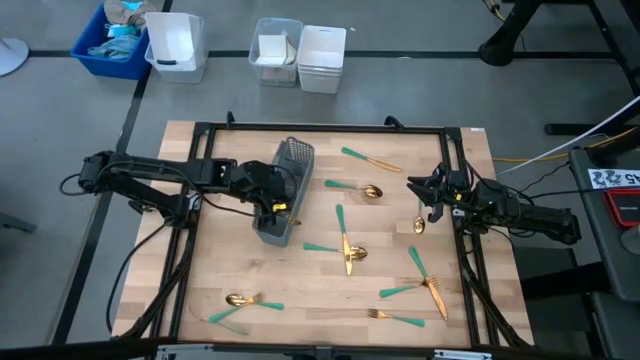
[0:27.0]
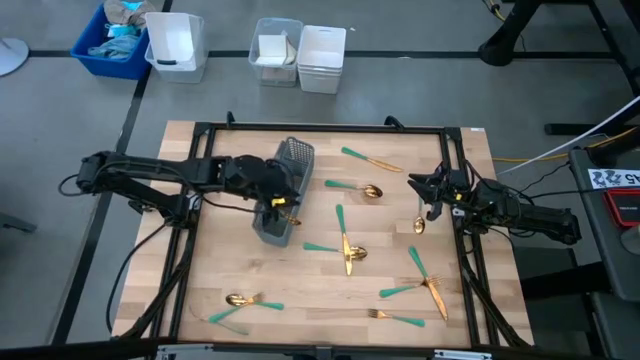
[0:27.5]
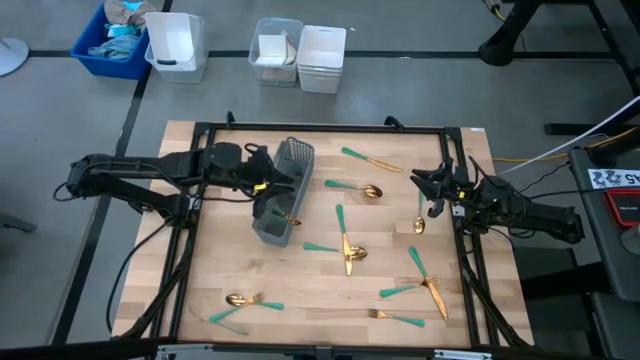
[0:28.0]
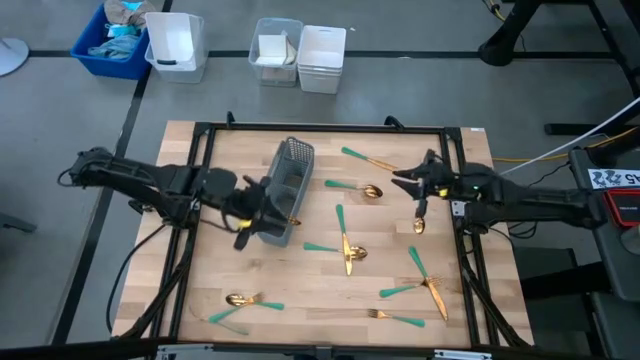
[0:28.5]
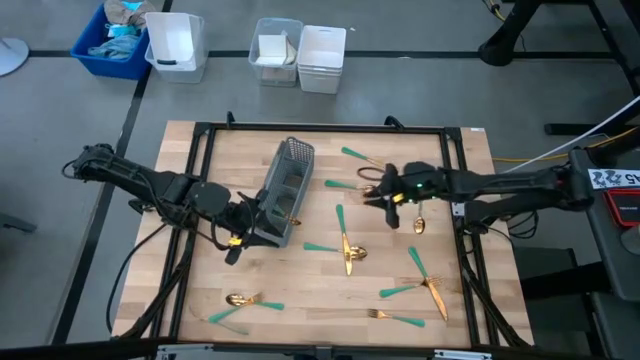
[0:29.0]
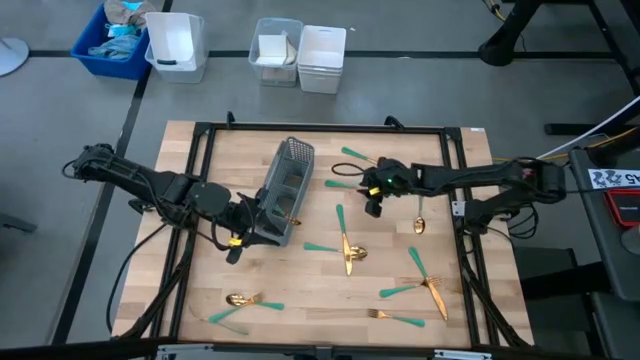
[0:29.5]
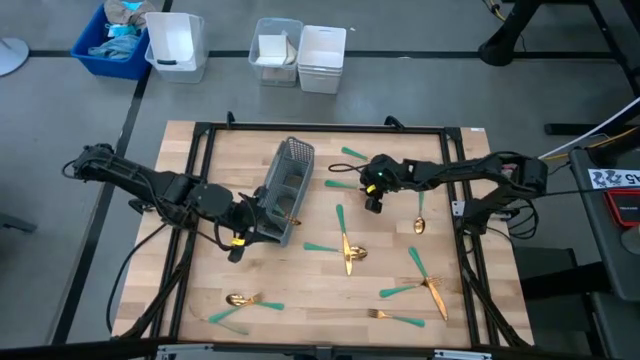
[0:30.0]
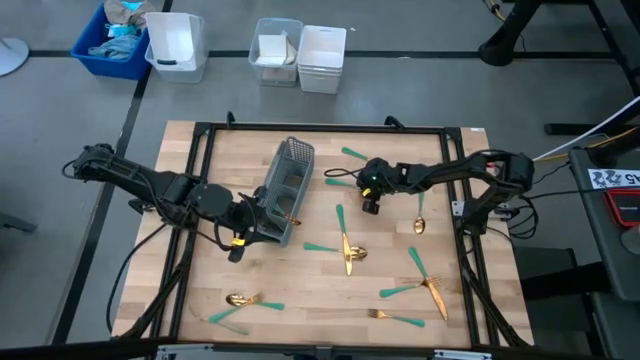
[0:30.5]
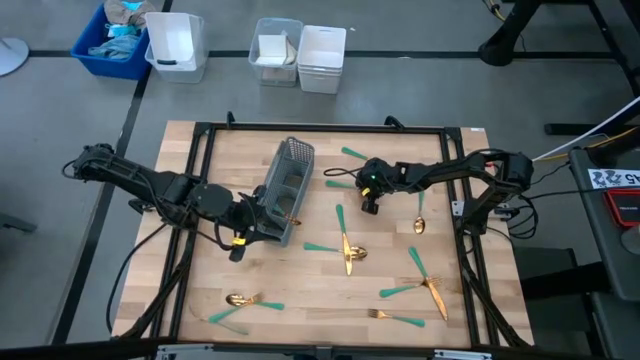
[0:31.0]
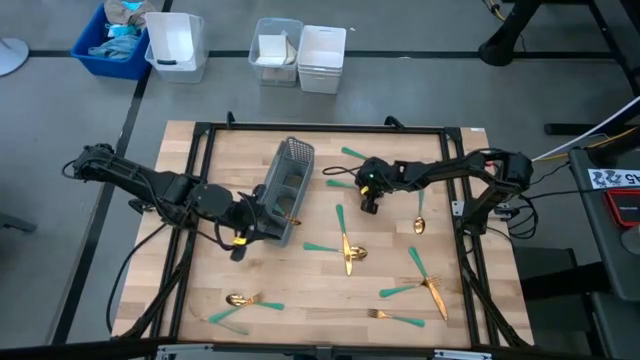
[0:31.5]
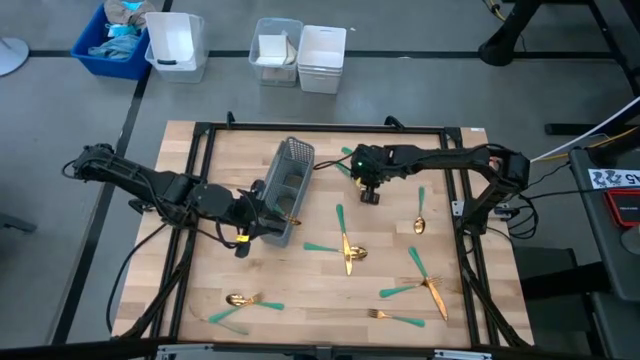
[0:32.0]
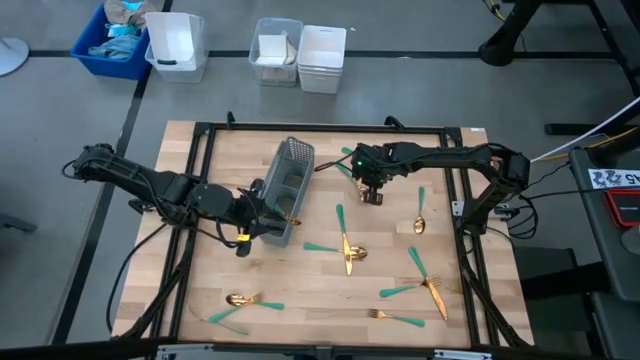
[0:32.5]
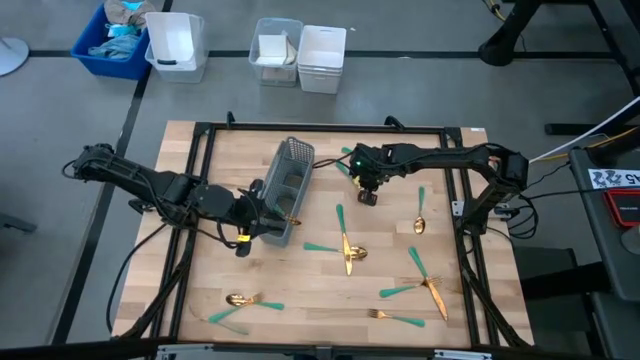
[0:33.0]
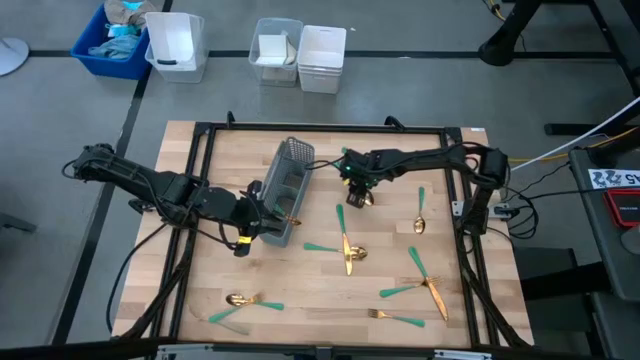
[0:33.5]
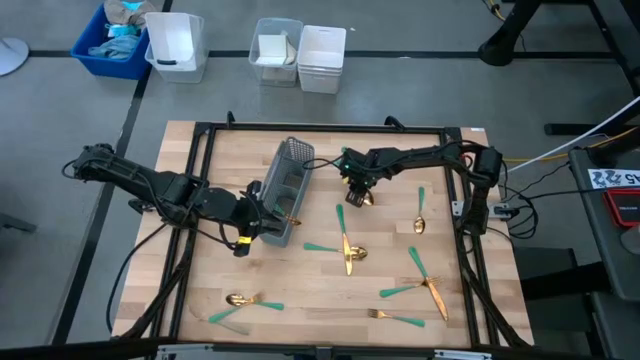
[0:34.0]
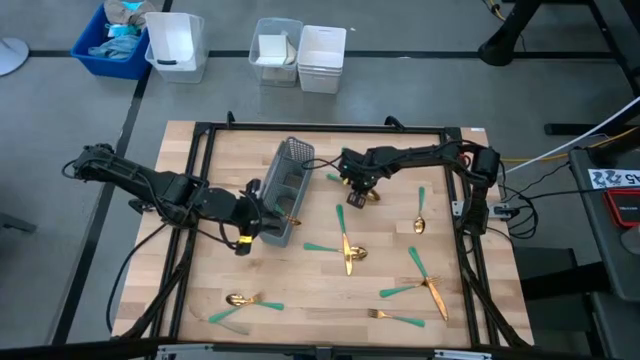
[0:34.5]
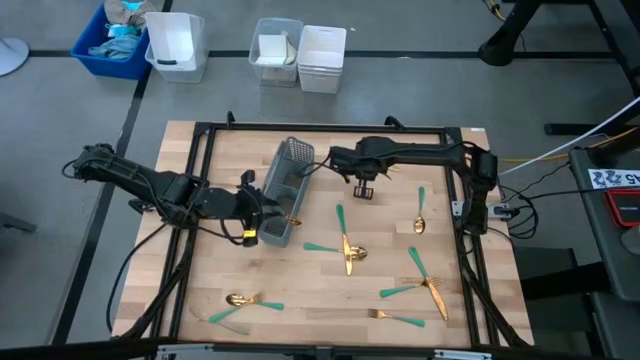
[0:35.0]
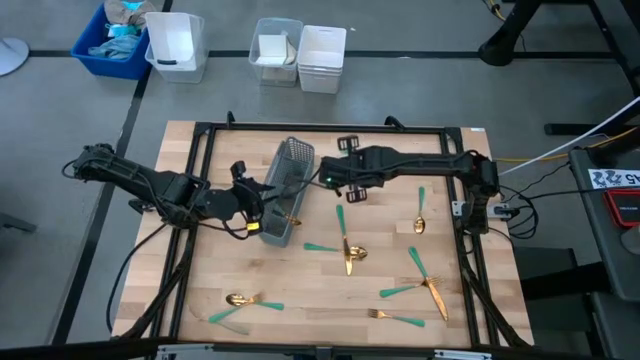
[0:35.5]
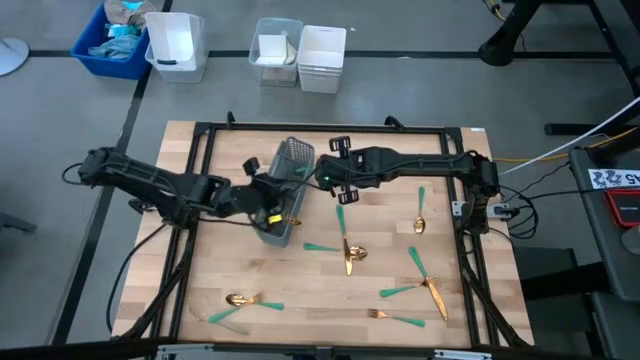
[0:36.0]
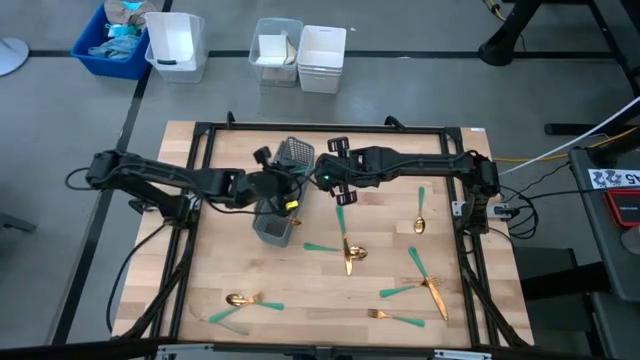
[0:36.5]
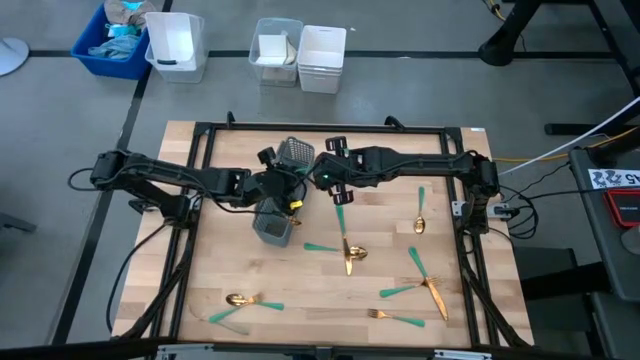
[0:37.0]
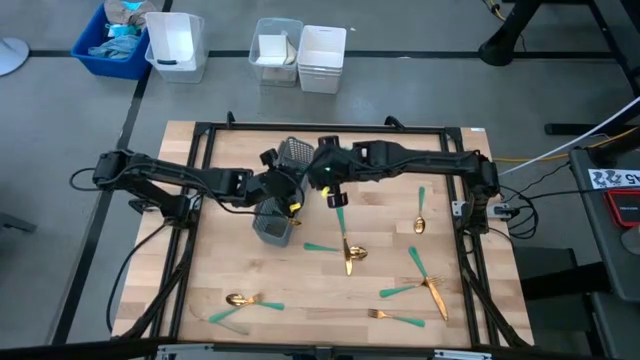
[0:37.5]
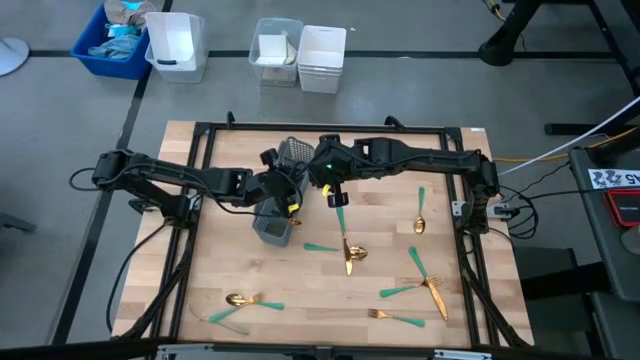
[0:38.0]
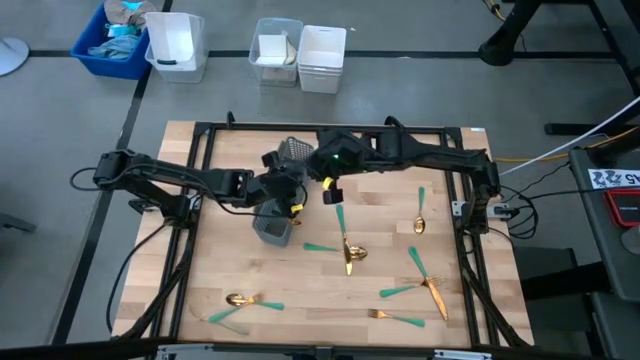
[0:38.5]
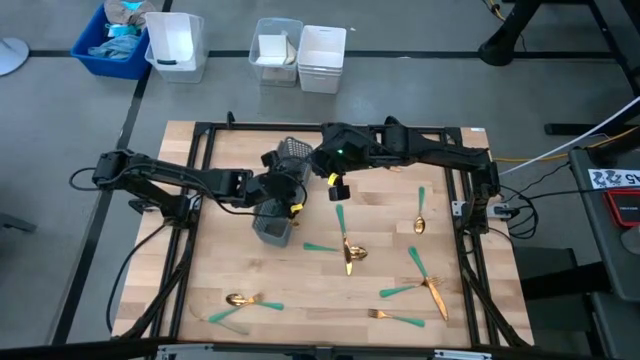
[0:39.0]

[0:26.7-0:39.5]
Task: Sort silverware
Put the green spoon into the gray silverware rack

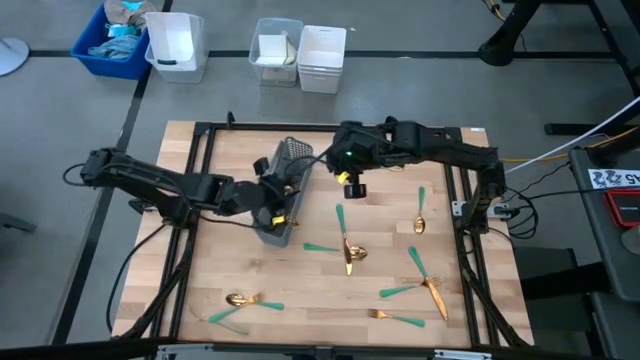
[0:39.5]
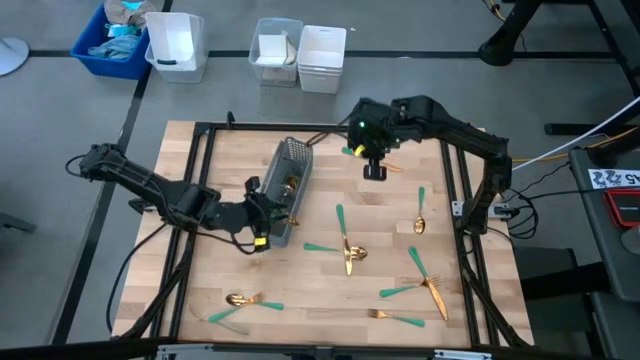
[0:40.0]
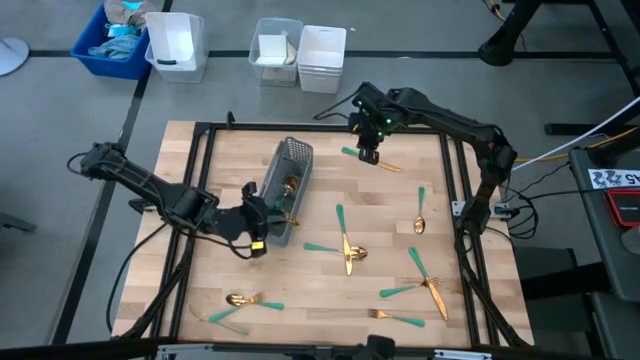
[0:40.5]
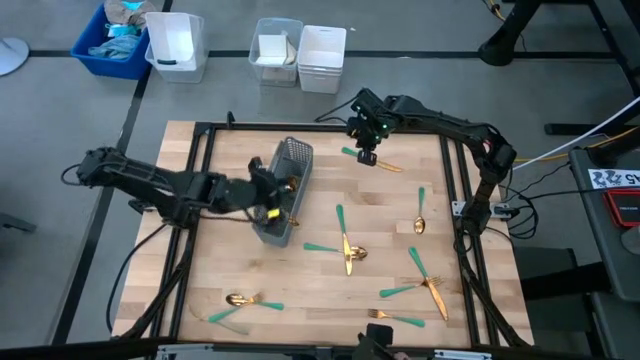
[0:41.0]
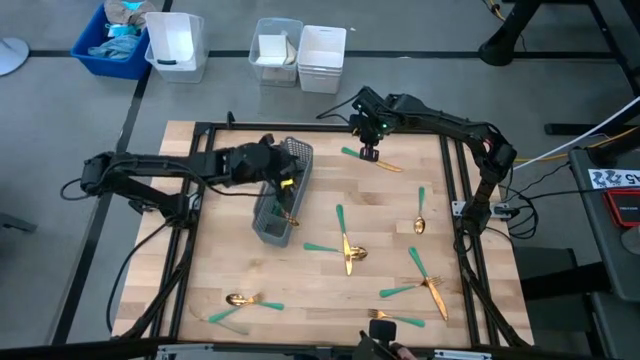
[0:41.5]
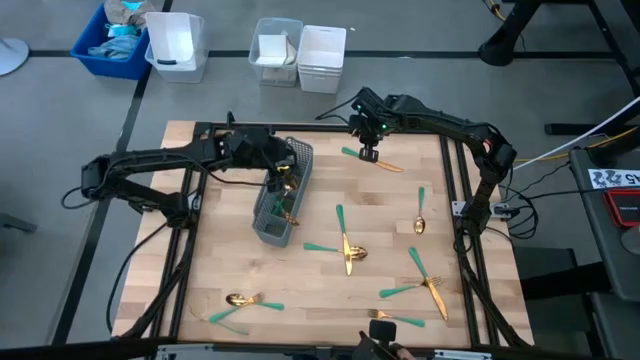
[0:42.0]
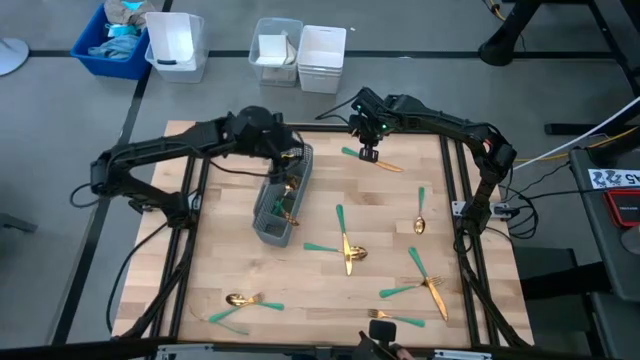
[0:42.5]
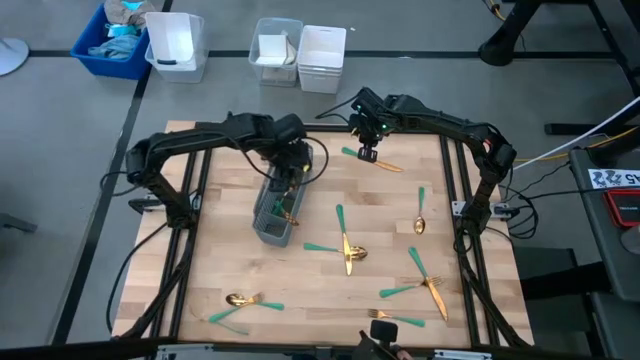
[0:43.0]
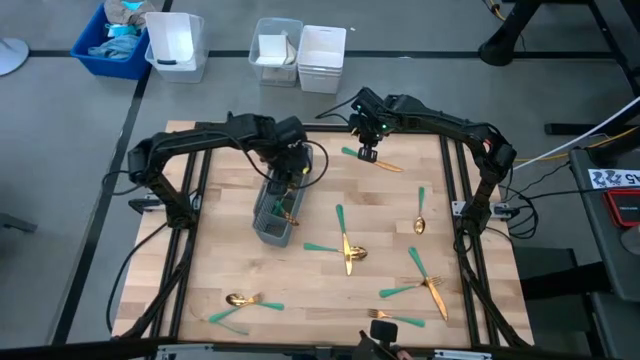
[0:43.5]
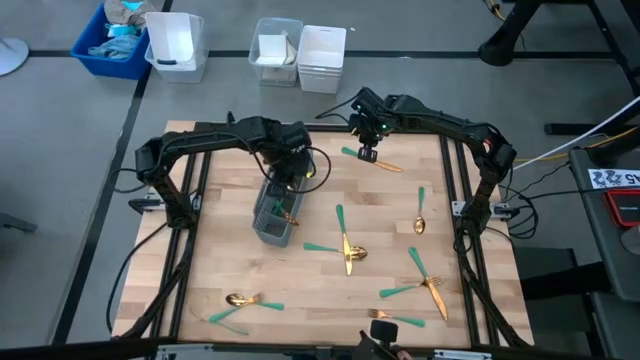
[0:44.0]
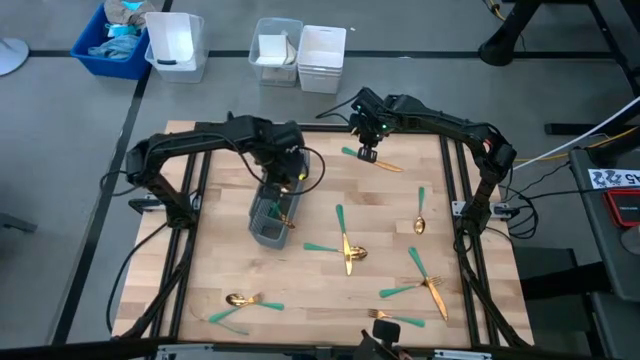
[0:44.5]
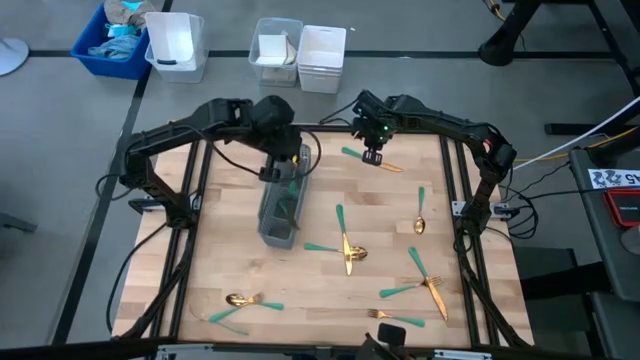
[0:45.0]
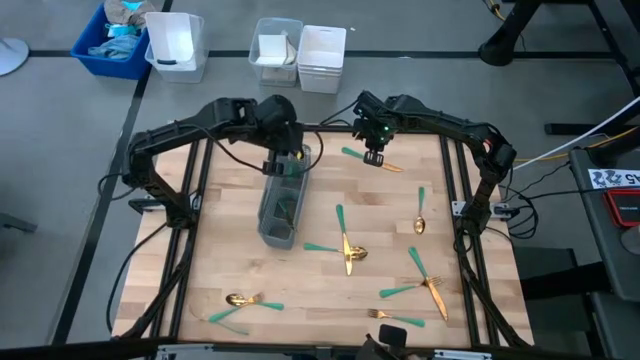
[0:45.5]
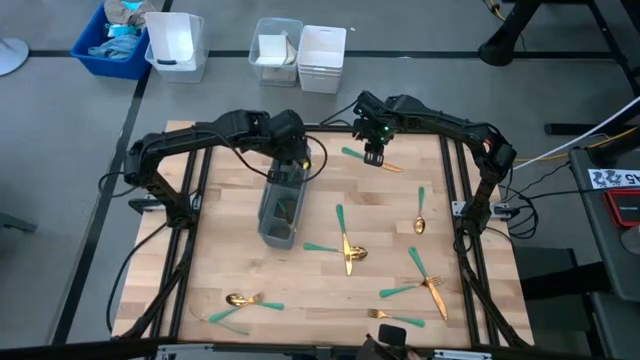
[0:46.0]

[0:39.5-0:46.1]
Put the green spoon into the gray silverware rack
